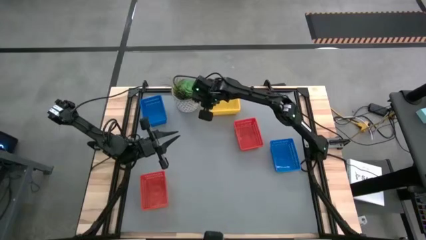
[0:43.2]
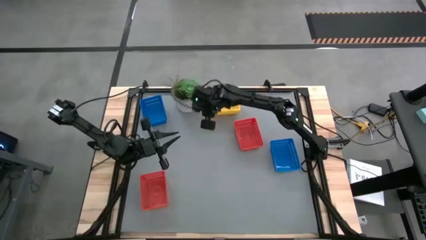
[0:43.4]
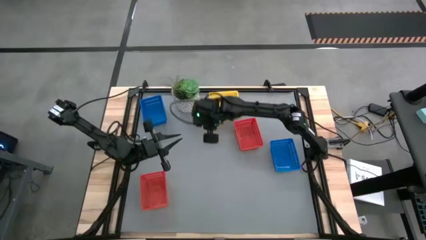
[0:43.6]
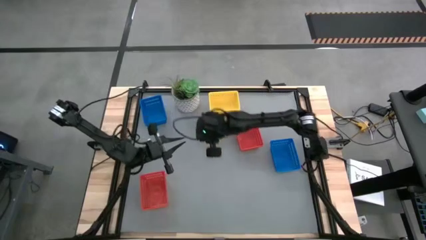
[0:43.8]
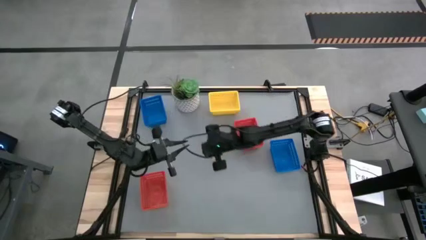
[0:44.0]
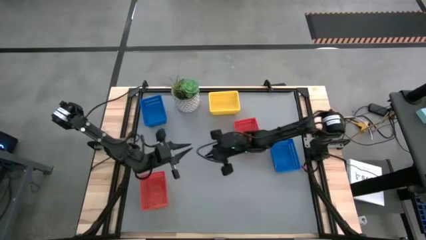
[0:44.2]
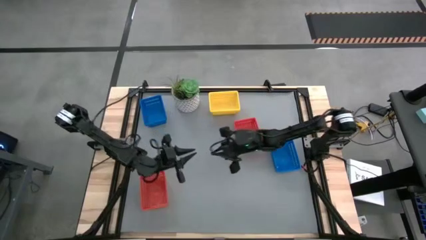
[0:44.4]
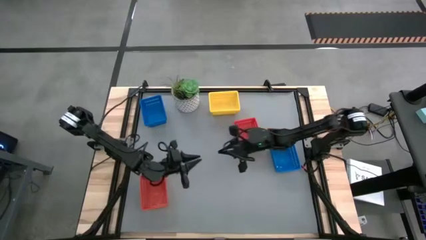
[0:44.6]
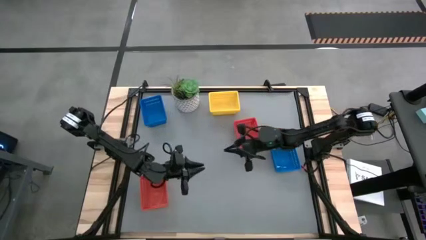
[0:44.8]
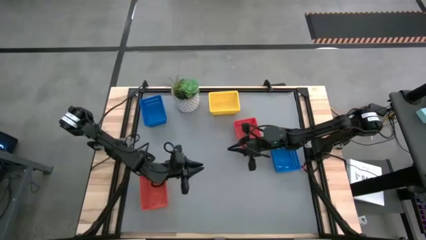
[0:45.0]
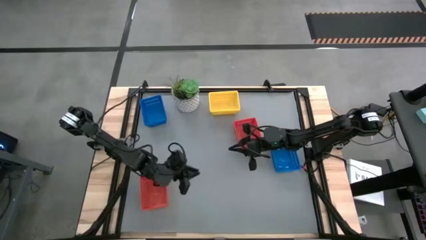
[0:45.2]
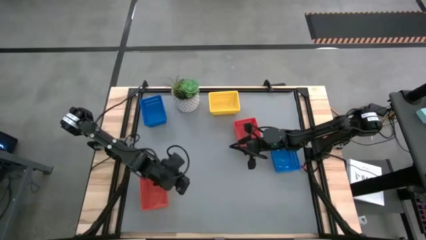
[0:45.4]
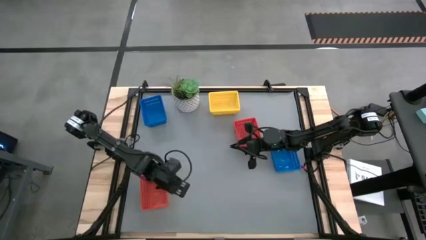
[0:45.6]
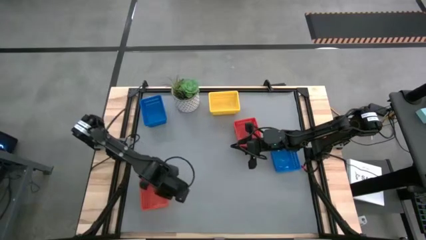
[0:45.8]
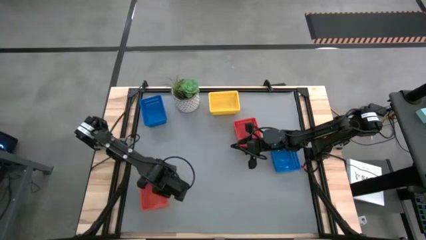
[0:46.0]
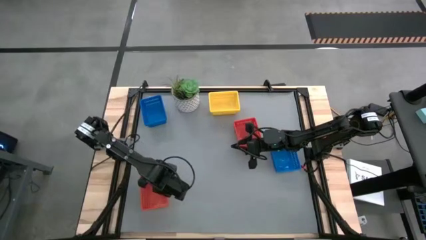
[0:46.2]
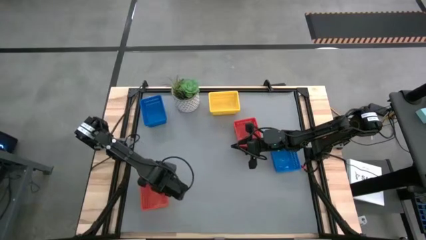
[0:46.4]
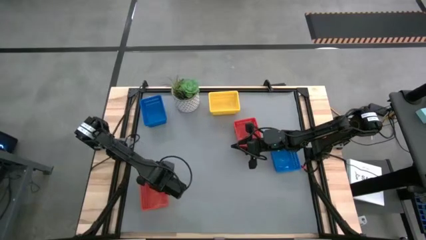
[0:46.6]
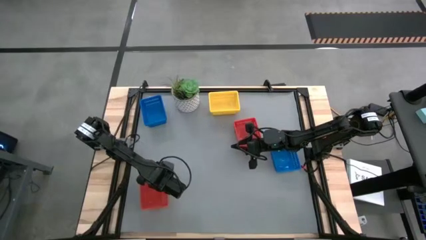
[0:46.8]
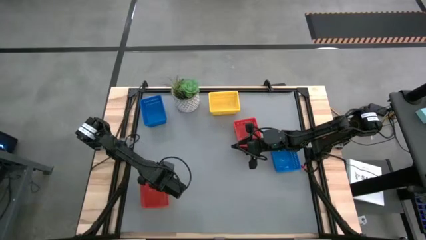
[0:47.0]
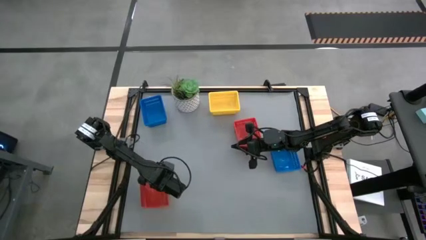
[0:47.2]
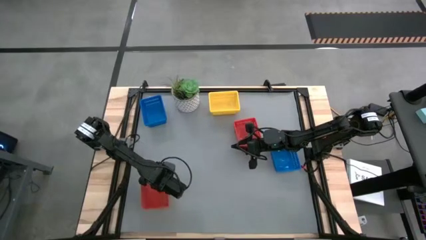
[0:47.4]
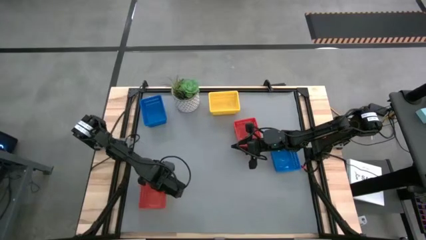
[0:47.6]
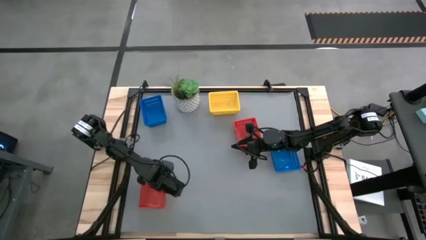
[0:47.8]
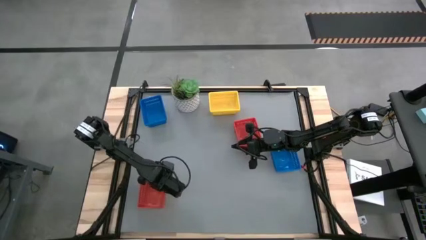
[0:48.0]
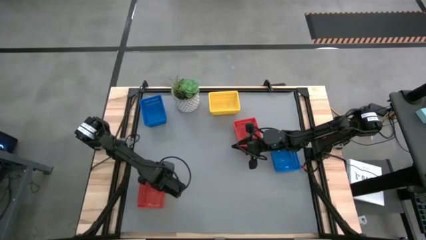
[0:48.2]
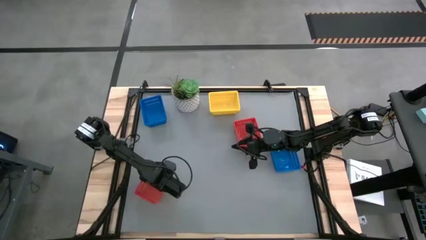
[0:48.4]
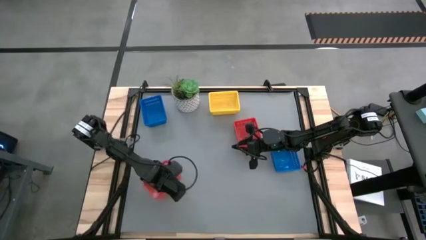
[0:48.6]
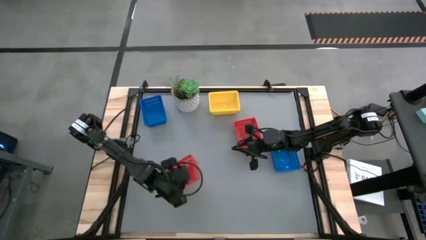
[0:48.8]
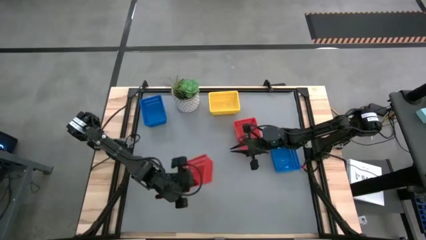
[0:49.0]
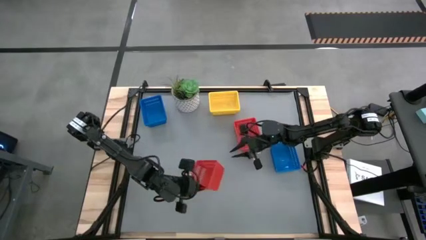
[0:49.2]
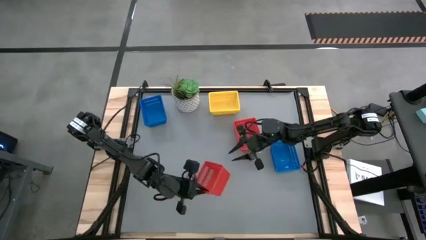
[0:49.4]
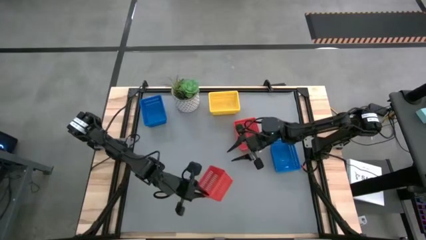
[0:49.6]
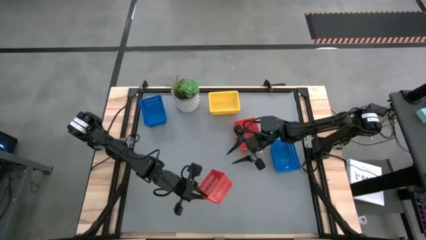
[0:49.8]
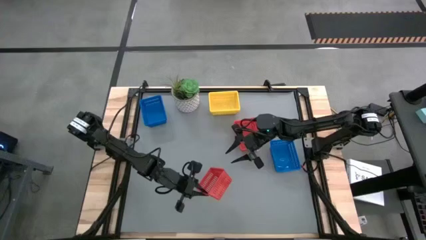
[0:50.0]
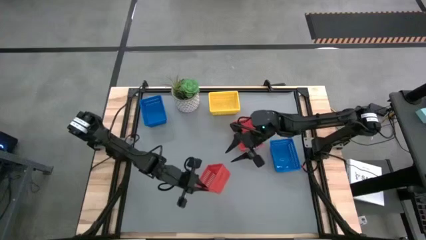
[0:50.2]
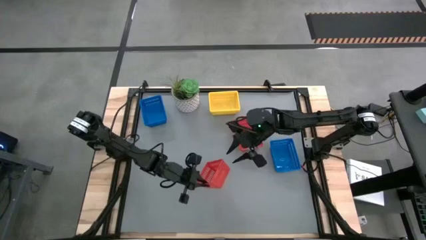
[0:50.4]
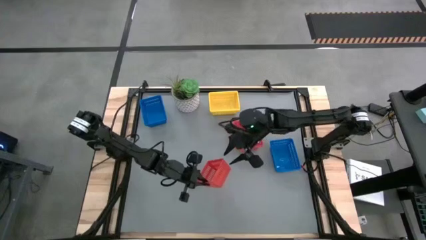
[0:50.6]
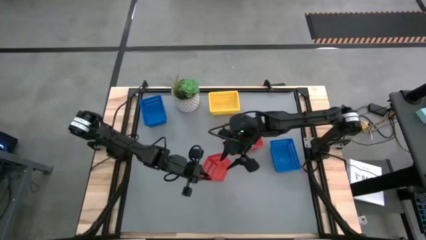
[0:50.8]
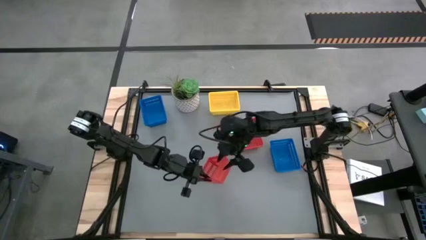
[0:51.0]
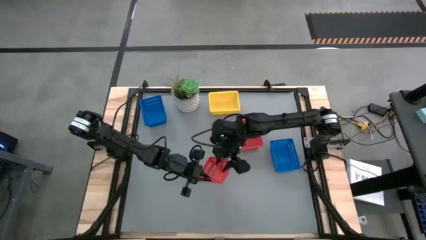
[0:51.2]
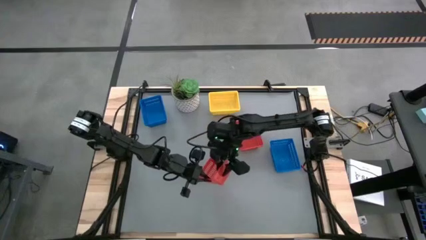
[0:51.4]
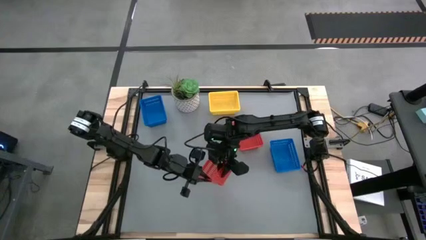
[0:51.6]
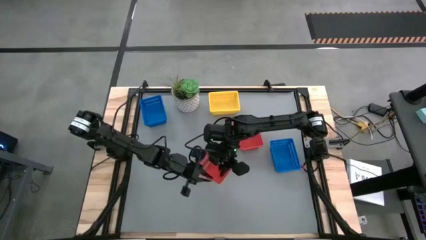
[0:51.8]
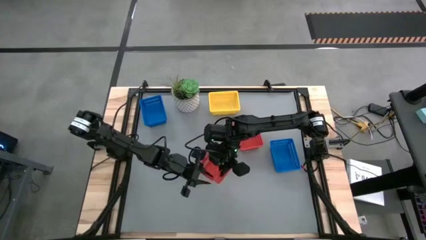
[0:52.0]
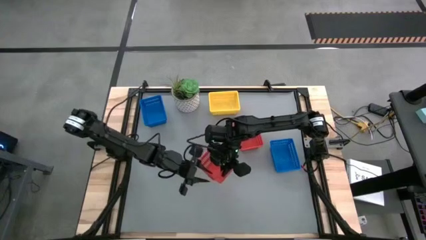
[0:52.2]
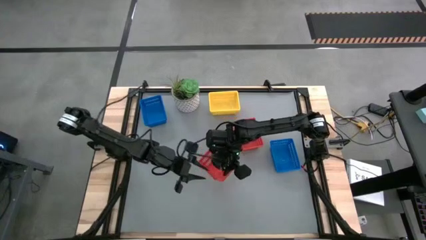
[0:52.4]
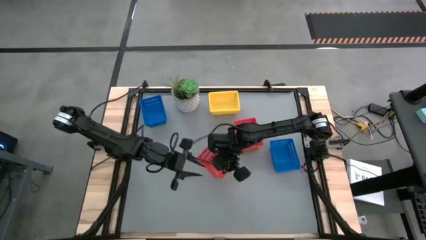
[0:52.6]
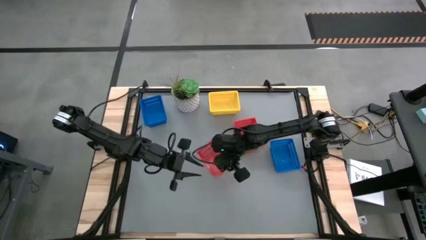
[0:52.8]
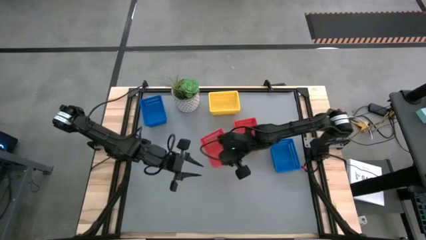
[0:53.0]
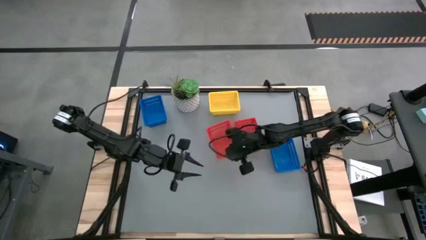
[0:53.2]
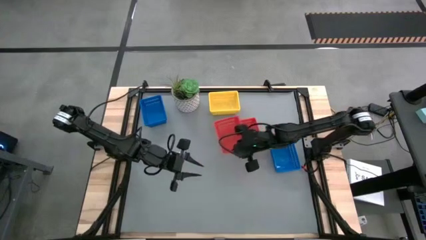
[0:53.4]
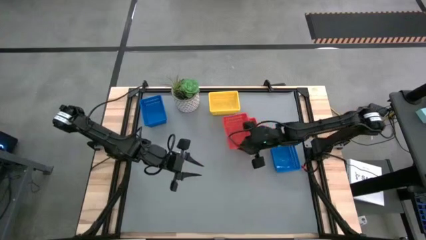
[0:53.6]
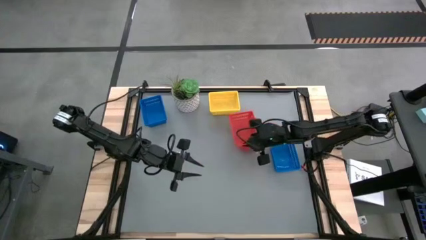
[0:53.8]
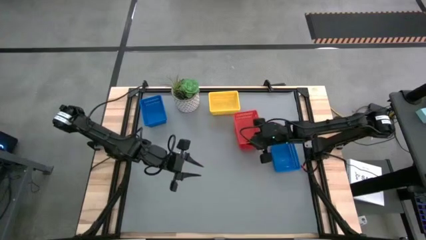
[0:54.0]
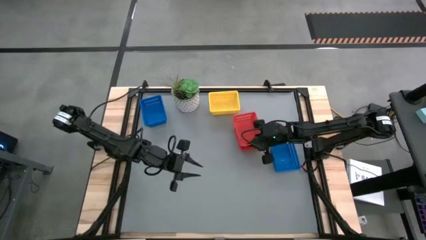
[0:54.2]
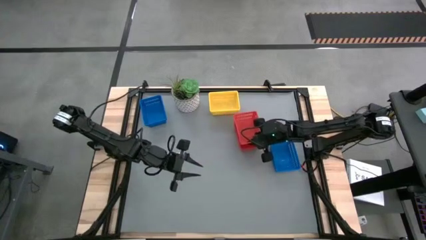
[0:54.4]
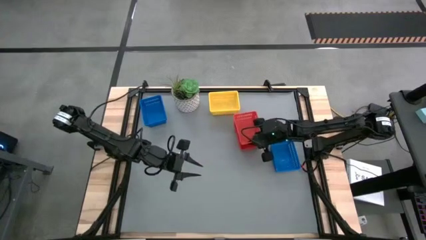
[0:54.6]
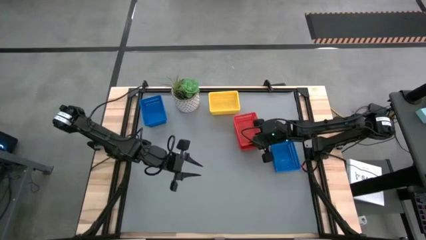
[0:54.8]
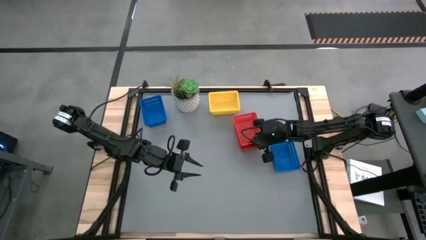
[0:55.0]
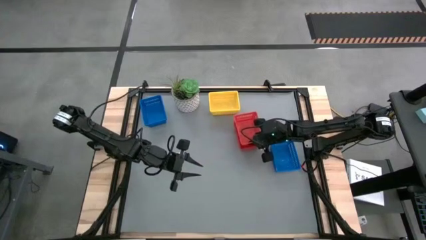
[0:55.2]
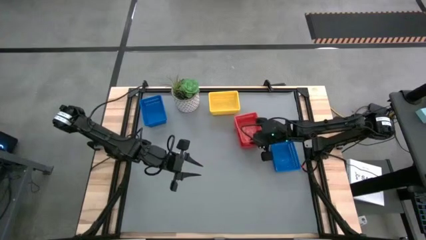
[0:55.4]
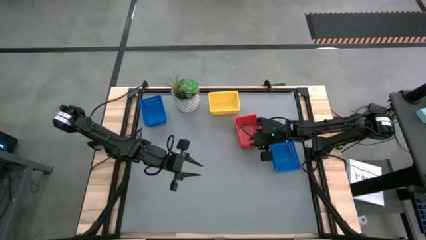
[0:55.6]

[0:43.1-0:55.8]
Stack the bottom red bin on top of the top red bin
